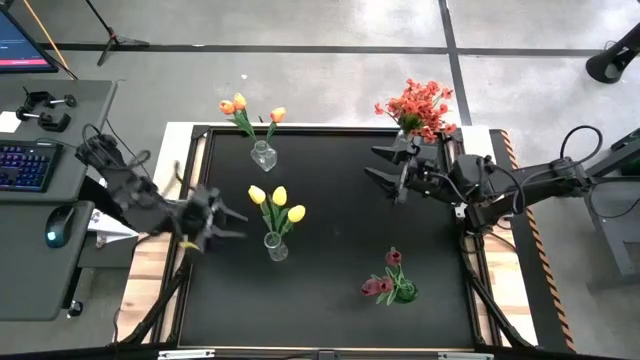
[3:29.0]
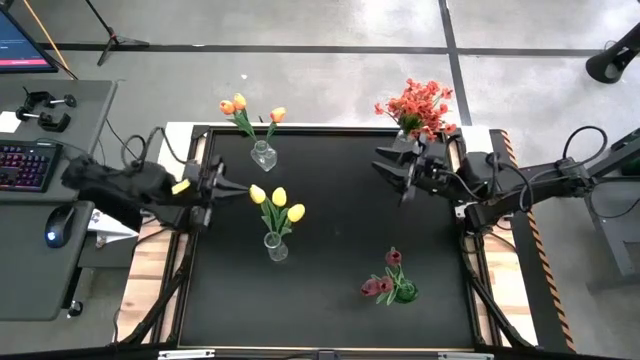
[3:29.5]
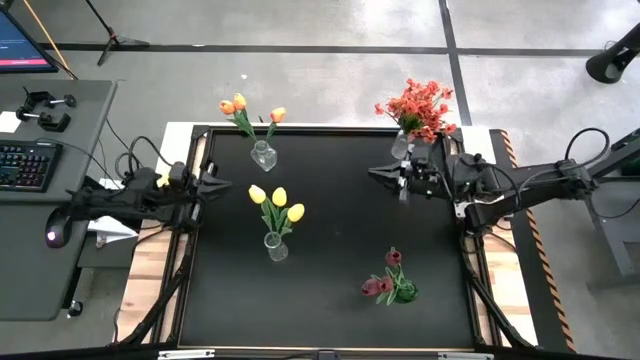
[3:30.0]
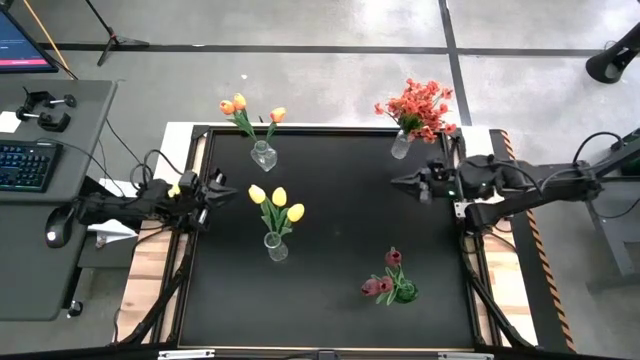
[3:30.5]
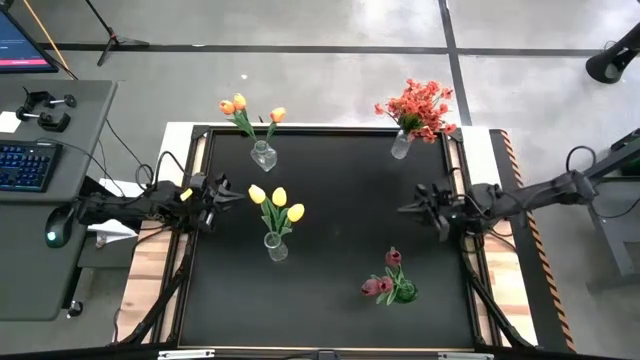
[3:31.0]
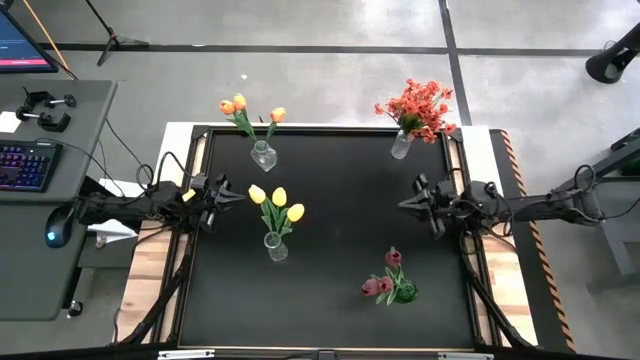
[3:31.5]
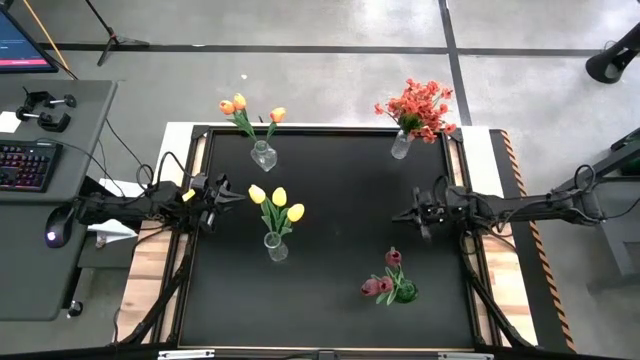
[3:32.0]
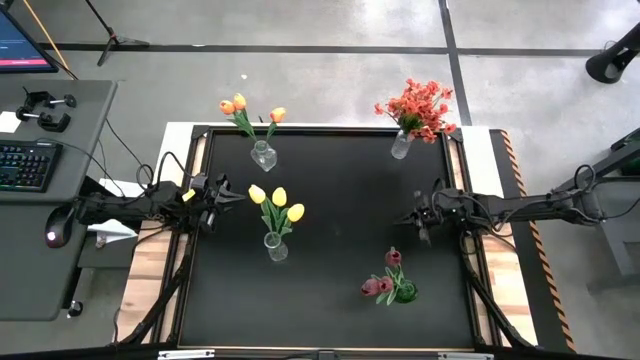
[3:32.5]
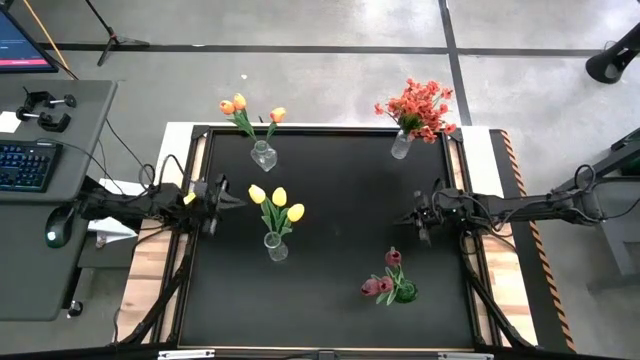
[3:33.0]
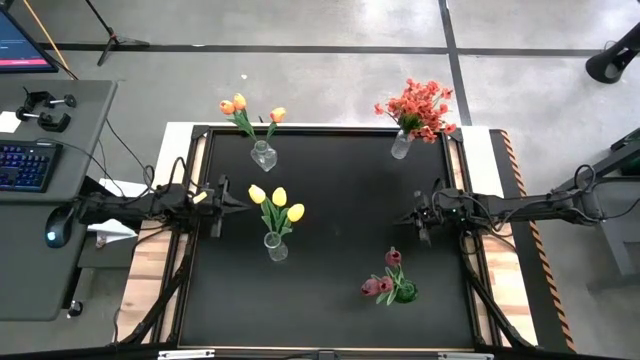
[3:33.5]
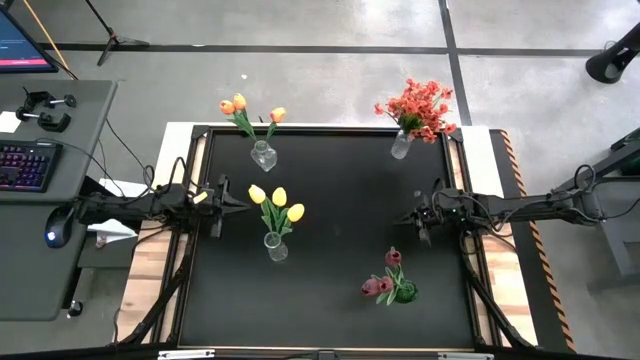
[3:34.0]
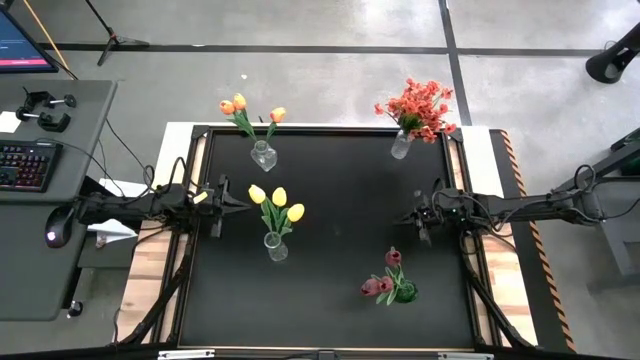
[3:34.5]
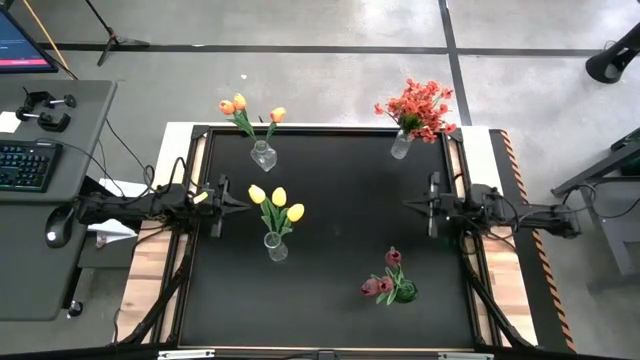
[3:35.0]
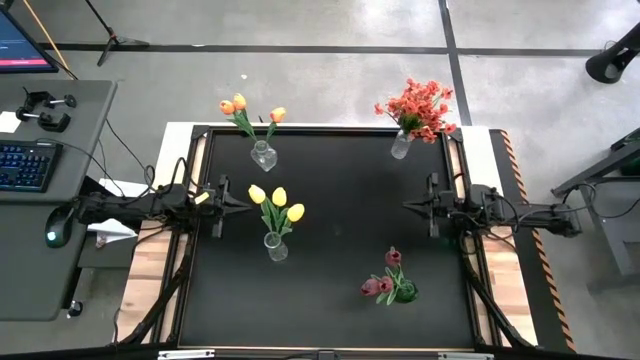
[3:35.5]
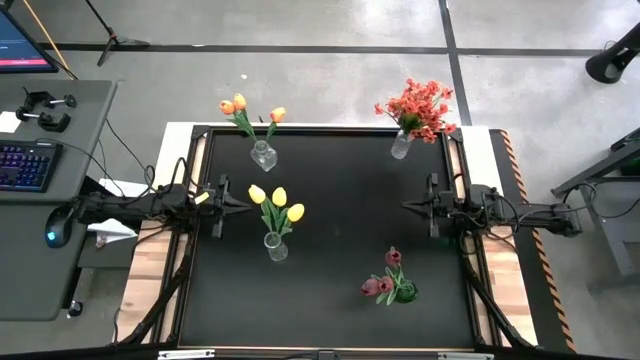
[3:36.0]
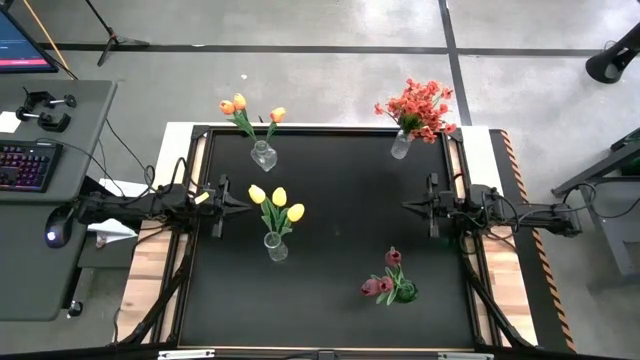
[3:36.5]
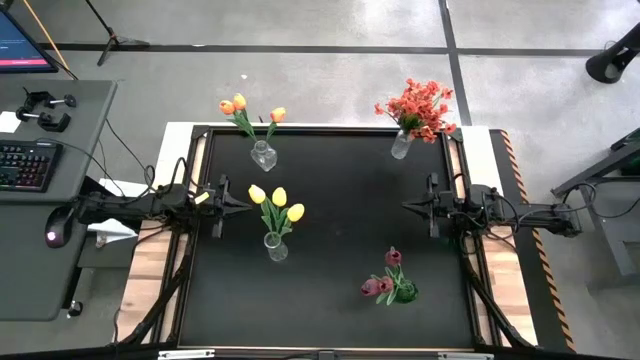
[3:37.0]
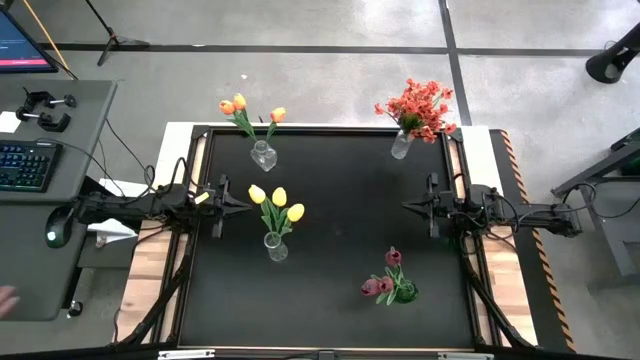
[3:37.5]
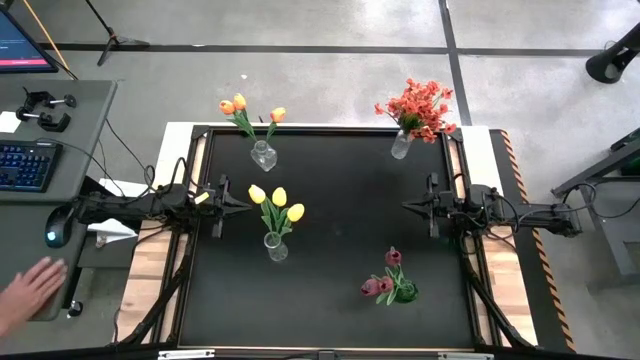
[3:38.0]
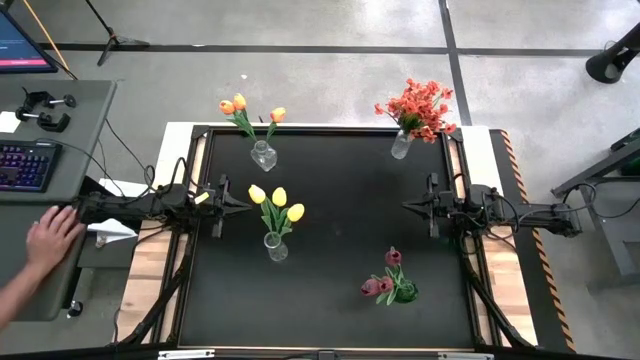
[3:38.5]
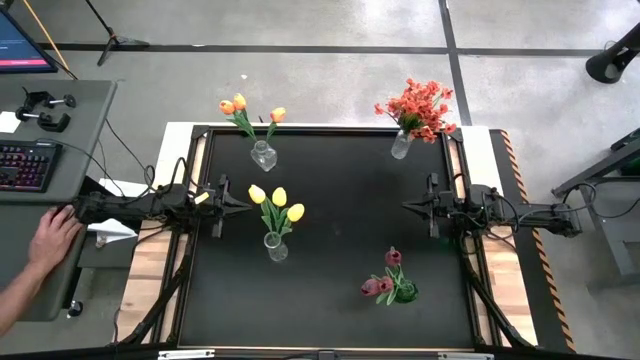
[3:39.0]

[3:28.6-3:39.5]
Task: Sort flowers into vase by color
Return to Home Position

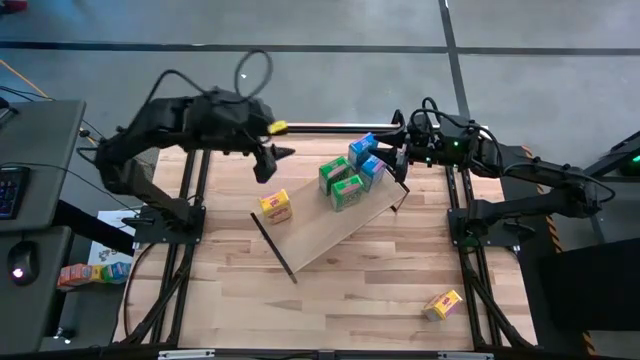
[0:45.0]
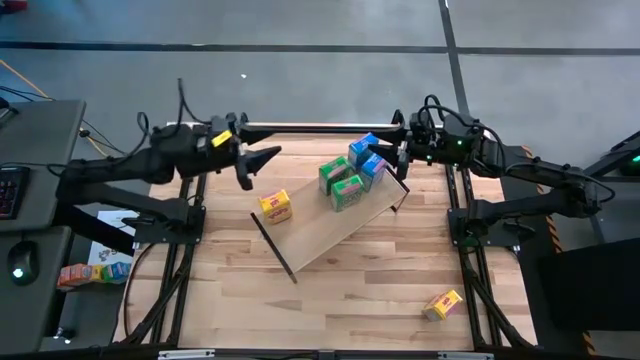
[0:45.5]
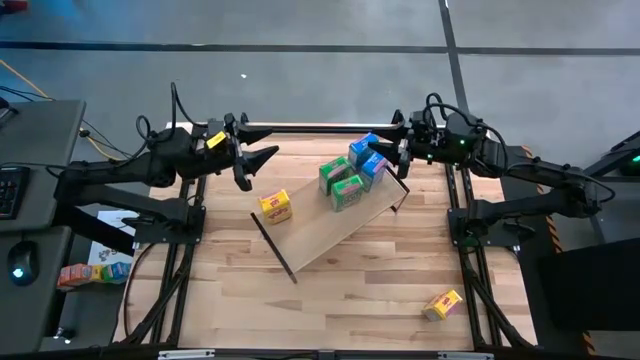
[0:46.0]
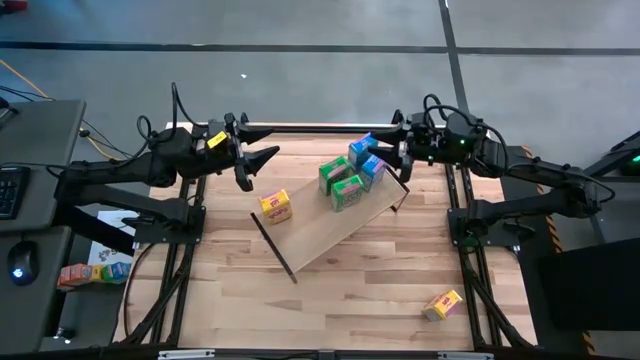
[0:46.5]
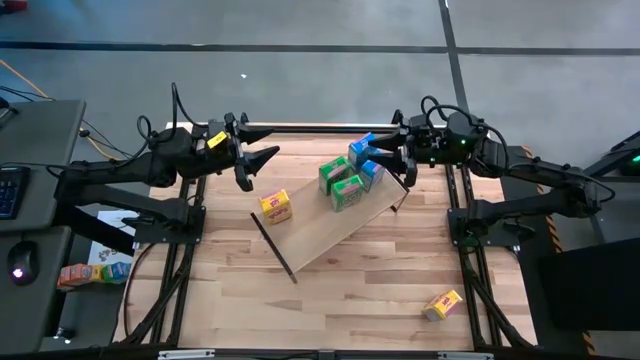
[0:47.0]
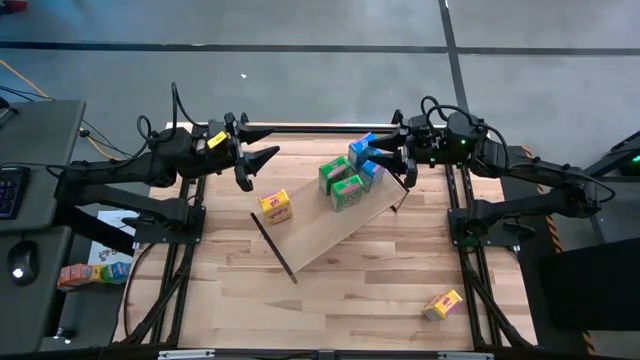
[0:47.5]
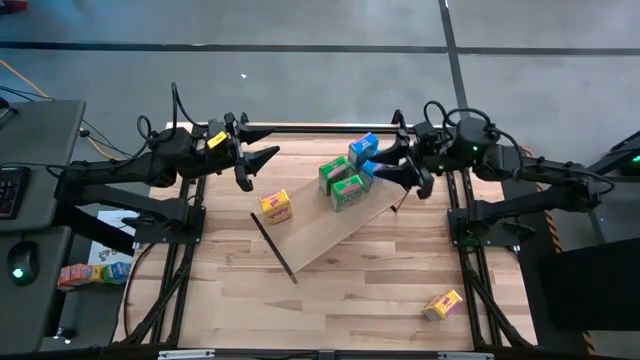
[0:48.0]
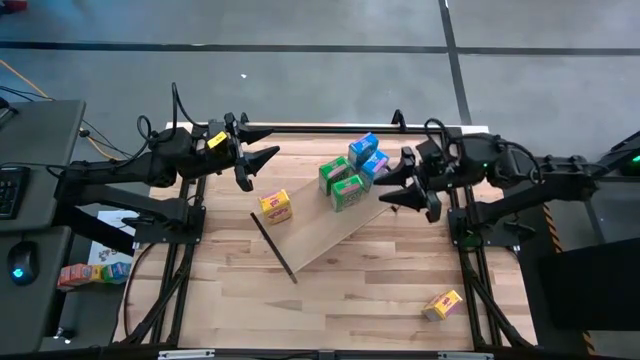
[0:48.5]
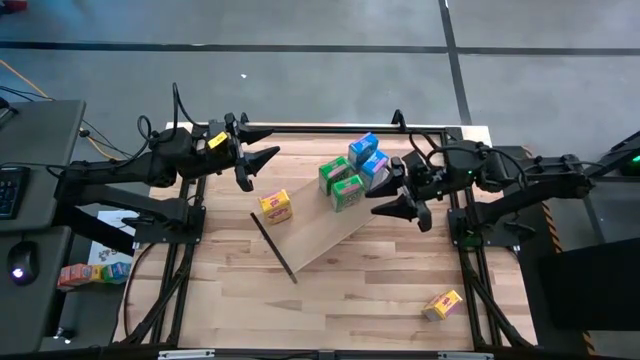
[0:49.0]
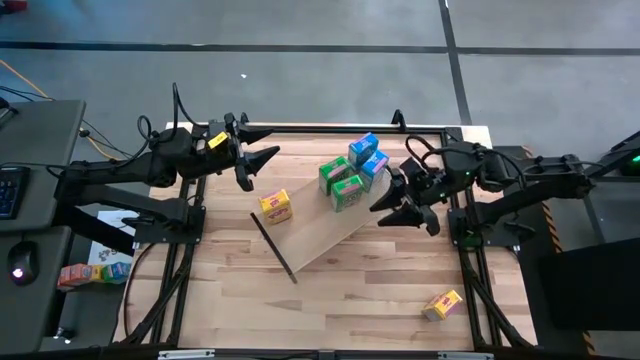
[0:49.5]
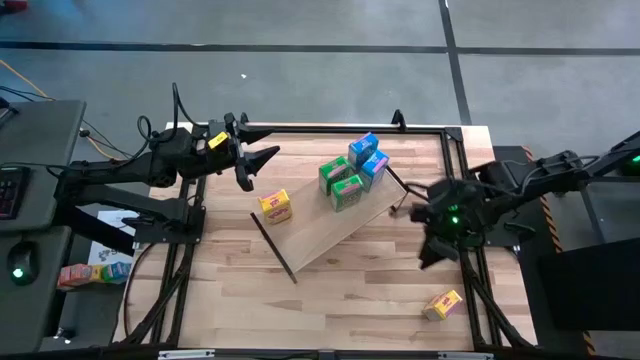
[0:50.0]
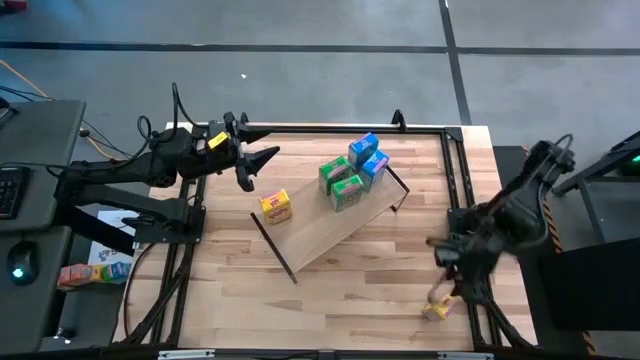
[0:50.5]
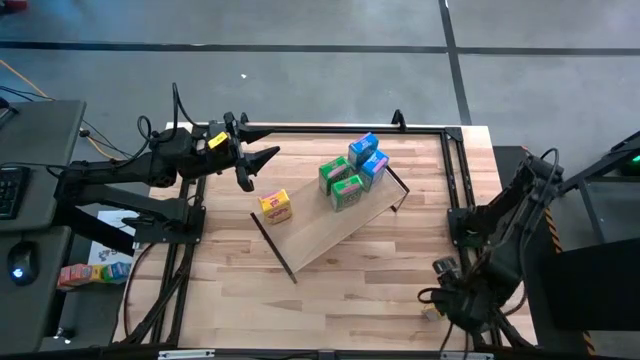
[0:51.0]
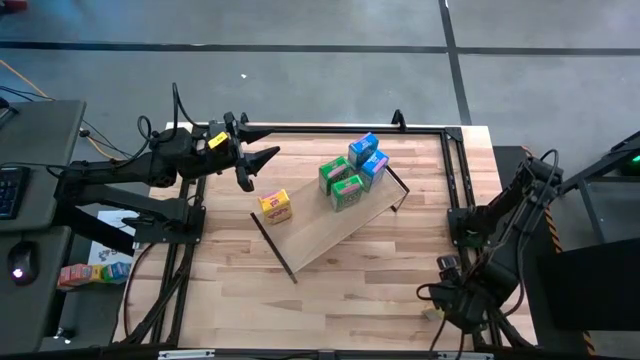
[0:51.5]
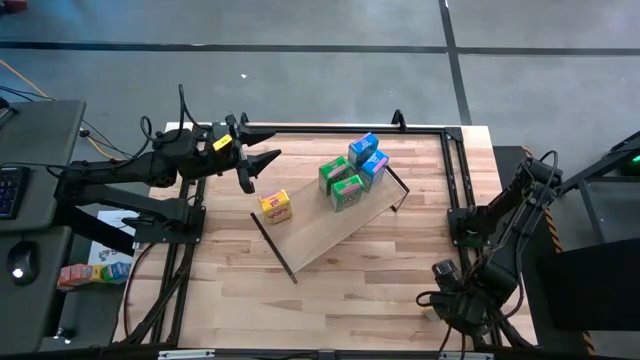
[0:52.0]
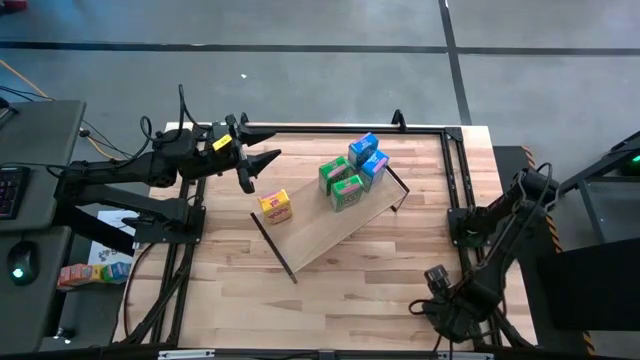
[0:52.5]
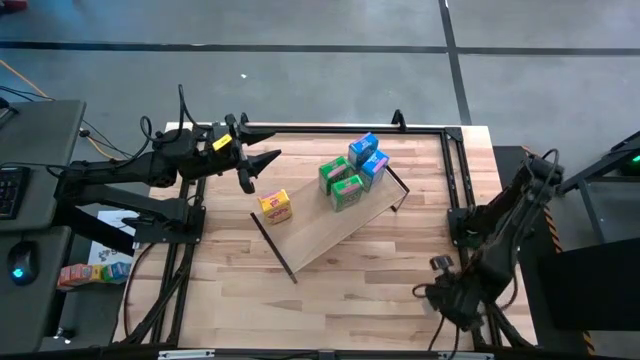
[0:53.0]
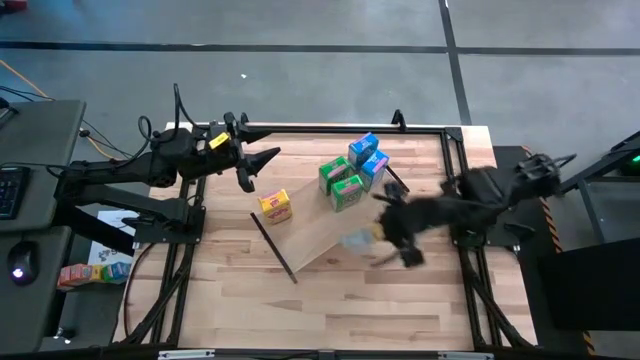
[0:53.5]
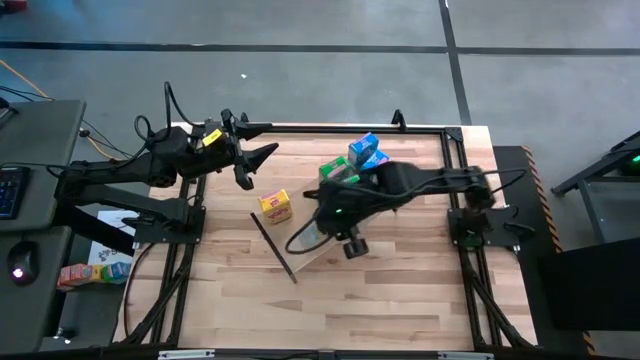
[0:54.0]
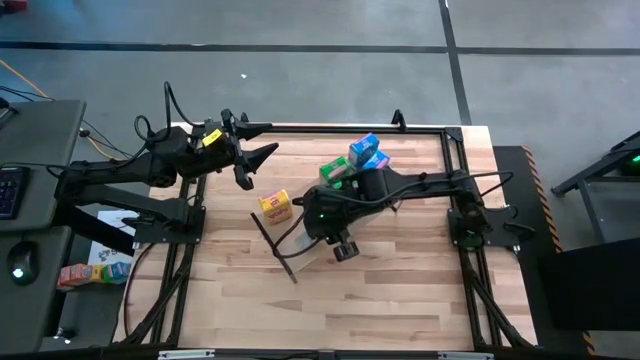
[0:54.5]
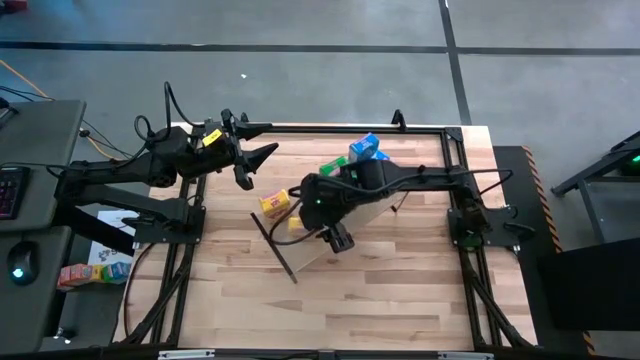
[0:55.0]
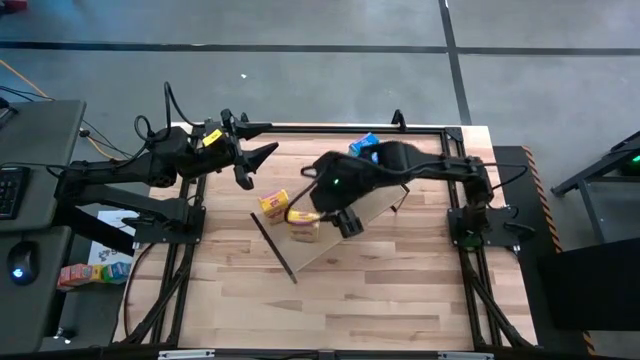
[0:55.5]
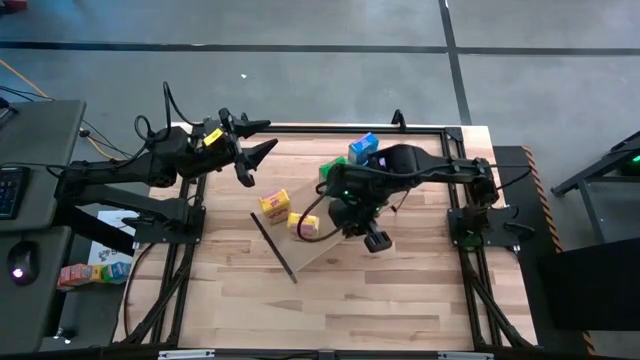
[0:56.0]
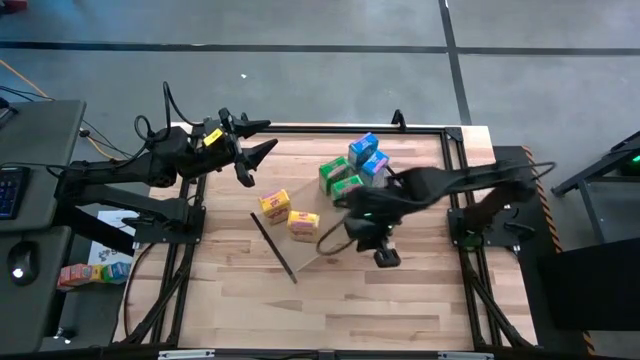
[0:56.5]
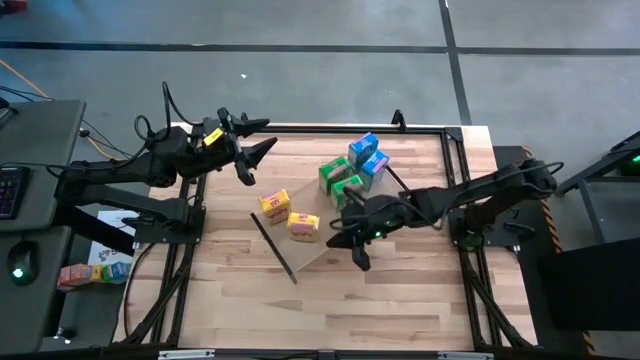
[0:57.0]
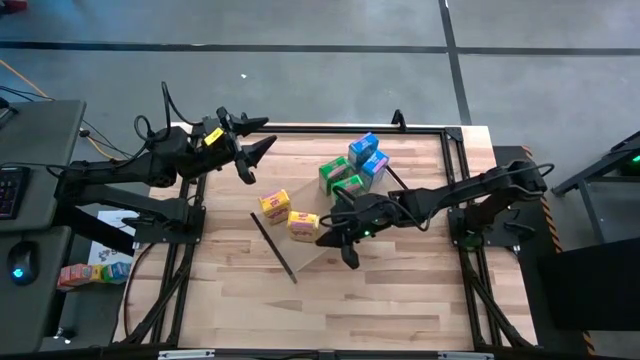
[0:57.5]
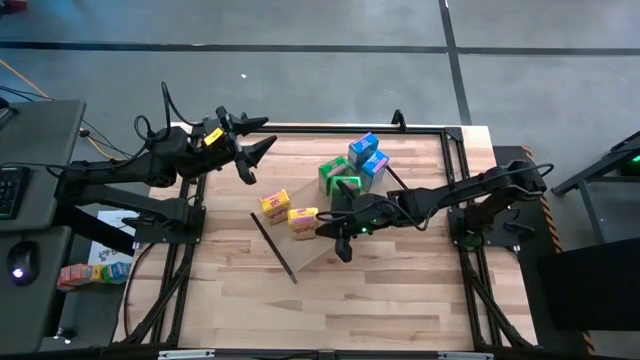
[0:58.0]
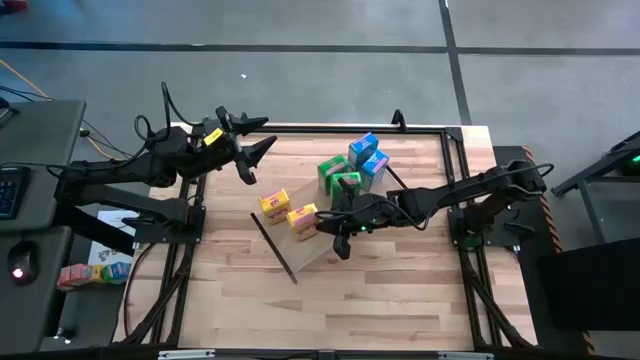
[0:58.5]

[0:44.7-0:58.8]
Task: Stack cereal on shelf
Put the yellow cereal box on the shelf aligned with the other yellow cereal box
